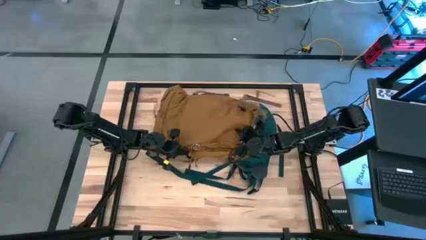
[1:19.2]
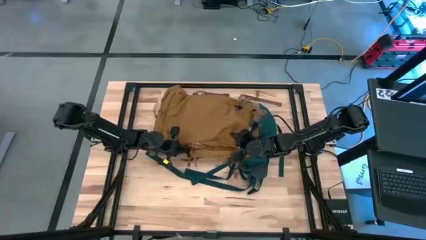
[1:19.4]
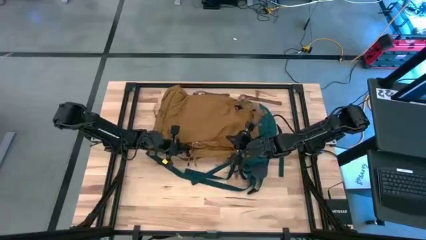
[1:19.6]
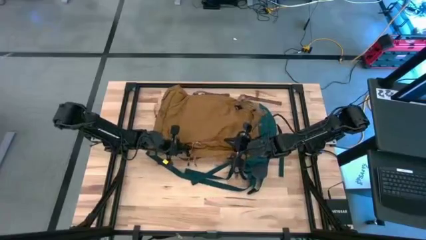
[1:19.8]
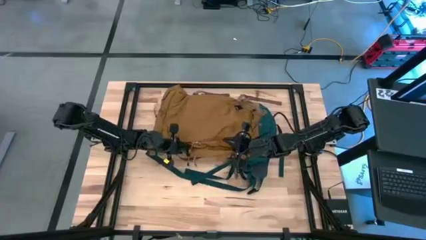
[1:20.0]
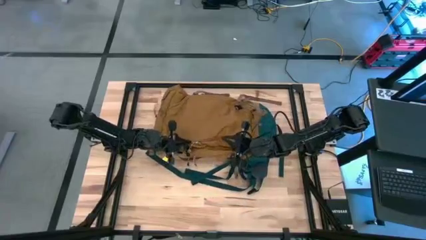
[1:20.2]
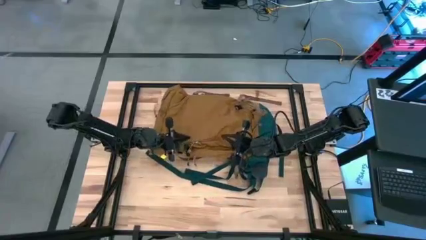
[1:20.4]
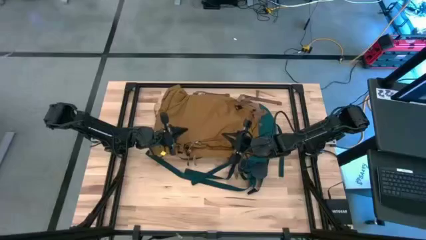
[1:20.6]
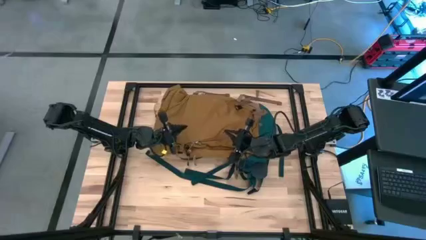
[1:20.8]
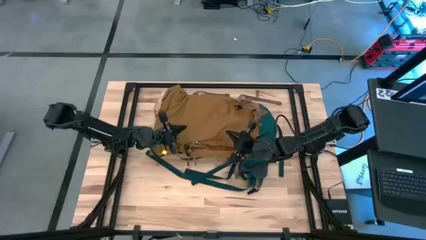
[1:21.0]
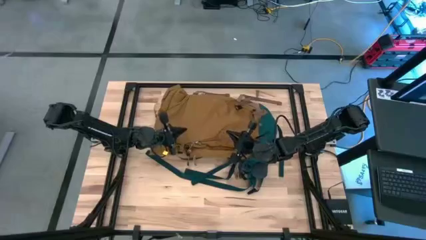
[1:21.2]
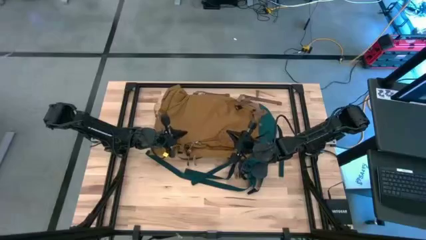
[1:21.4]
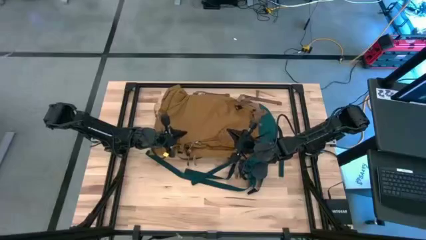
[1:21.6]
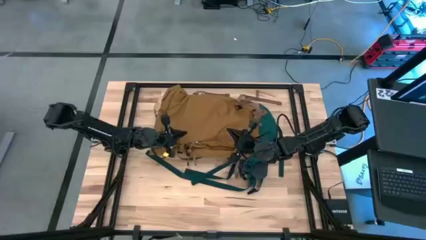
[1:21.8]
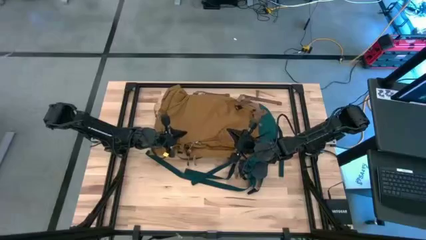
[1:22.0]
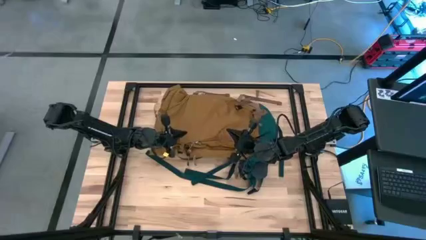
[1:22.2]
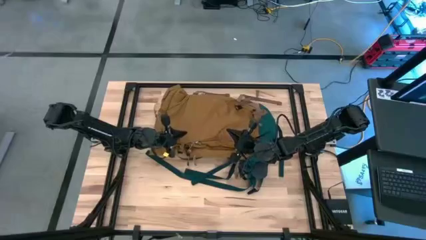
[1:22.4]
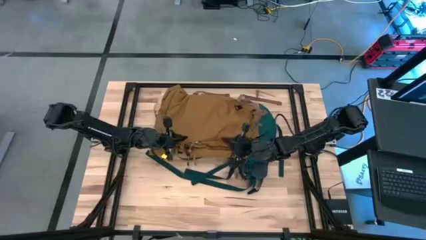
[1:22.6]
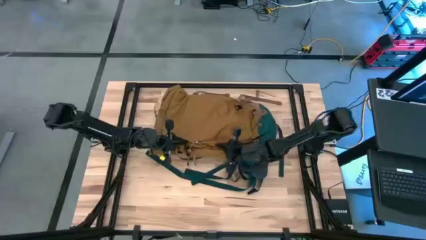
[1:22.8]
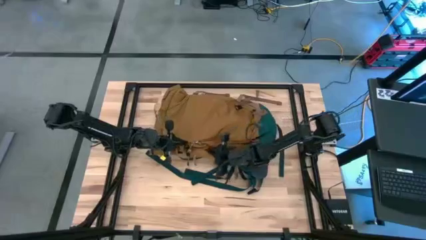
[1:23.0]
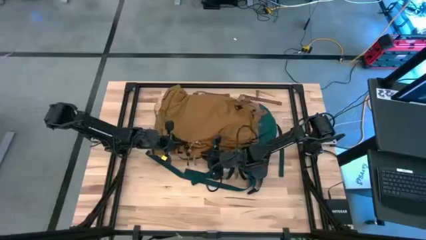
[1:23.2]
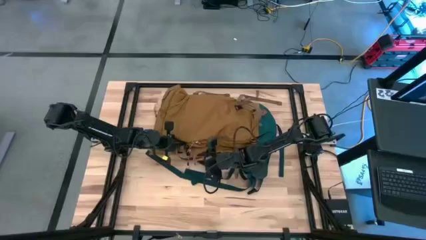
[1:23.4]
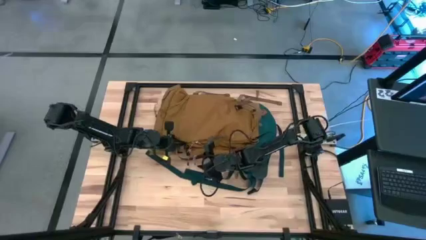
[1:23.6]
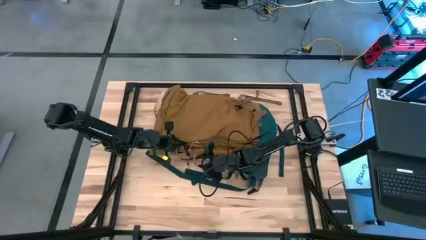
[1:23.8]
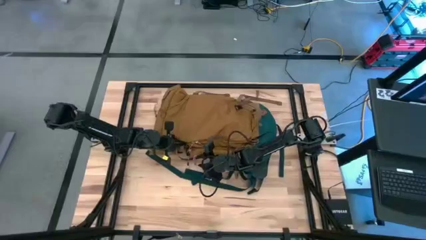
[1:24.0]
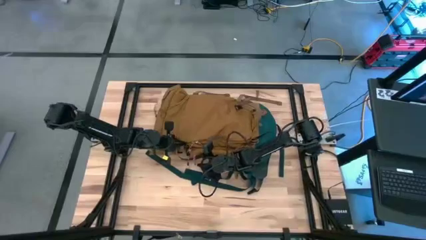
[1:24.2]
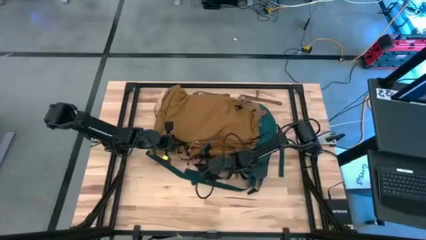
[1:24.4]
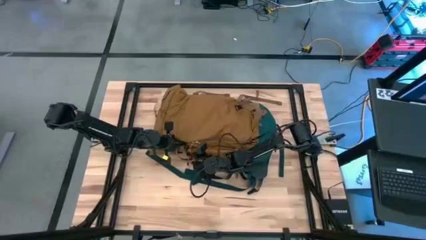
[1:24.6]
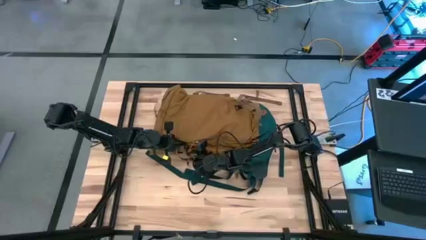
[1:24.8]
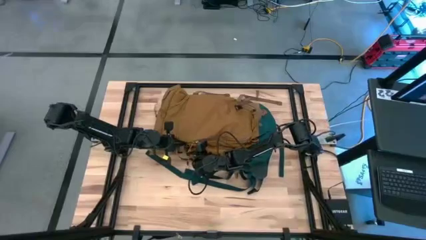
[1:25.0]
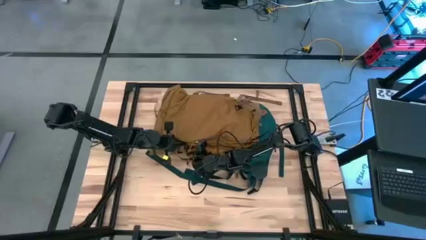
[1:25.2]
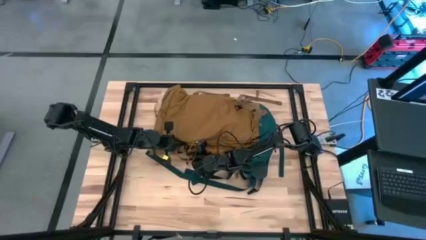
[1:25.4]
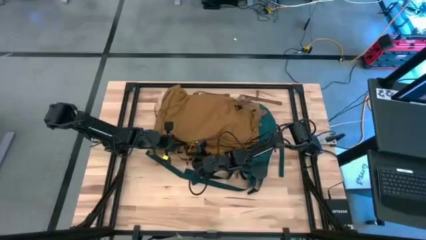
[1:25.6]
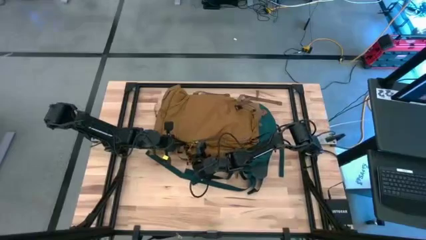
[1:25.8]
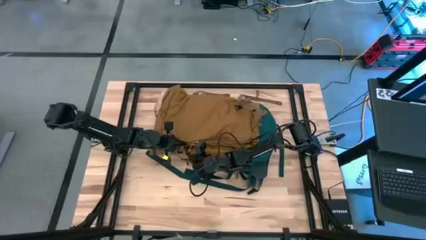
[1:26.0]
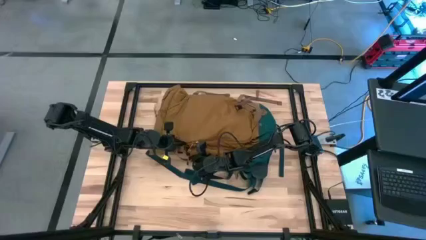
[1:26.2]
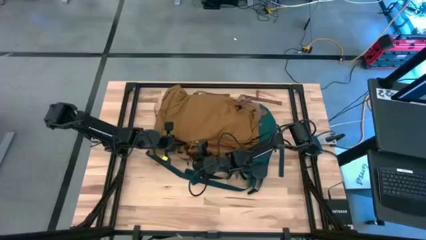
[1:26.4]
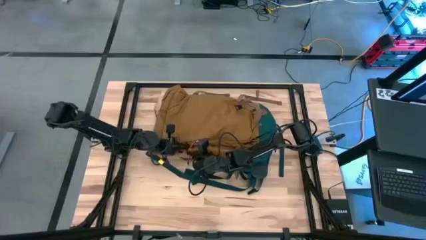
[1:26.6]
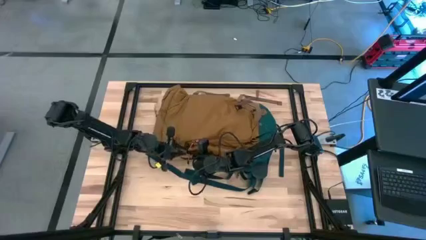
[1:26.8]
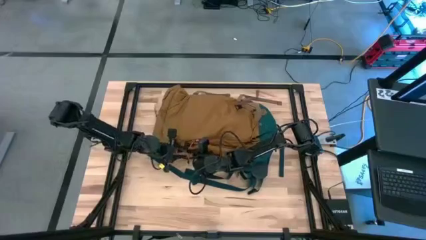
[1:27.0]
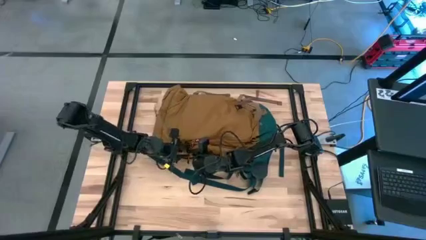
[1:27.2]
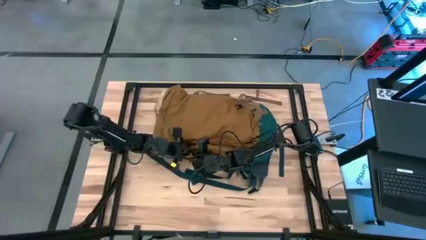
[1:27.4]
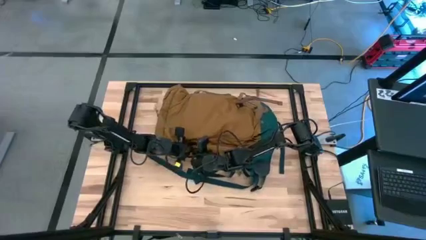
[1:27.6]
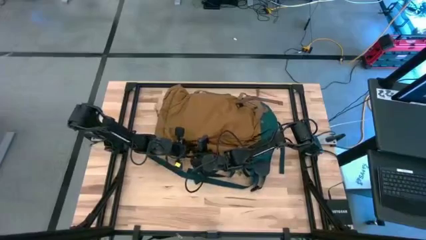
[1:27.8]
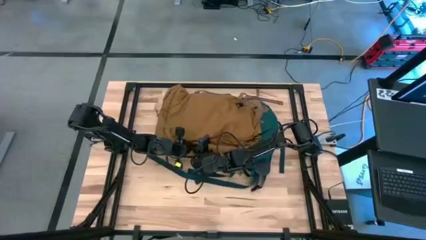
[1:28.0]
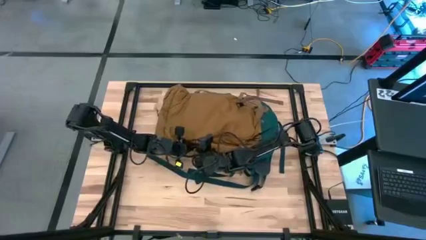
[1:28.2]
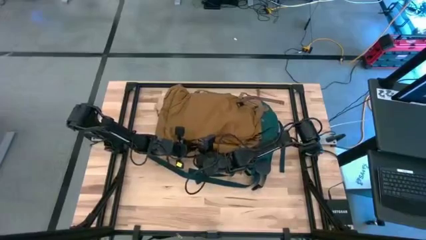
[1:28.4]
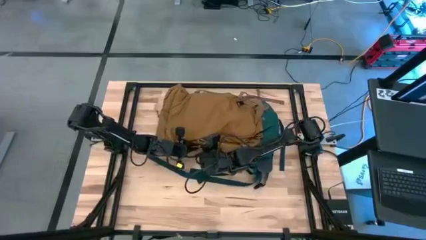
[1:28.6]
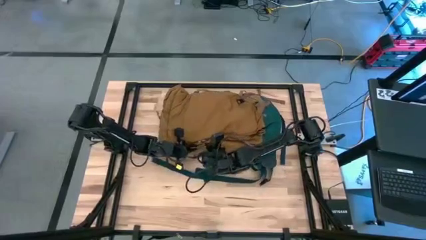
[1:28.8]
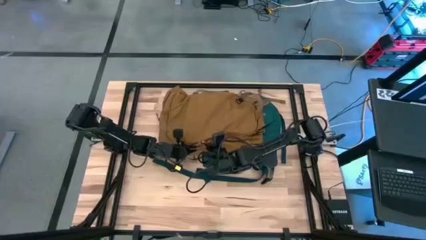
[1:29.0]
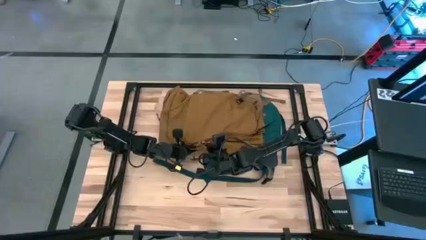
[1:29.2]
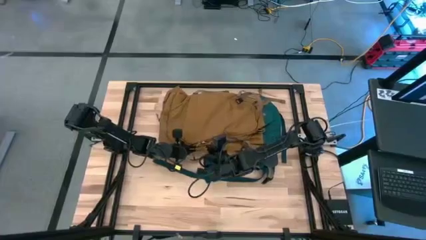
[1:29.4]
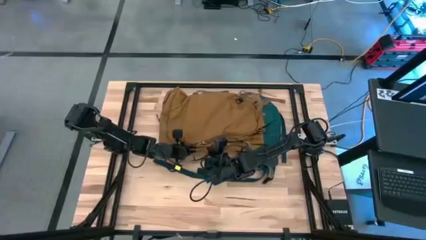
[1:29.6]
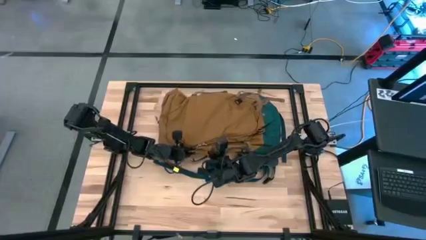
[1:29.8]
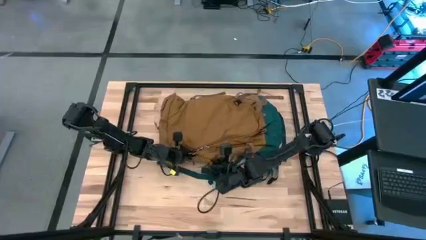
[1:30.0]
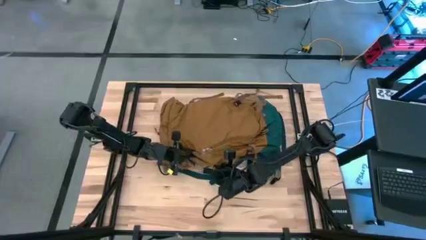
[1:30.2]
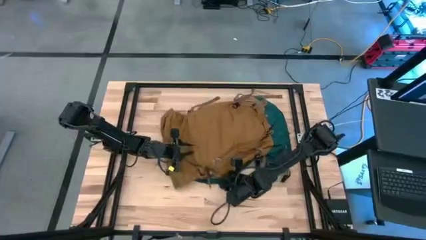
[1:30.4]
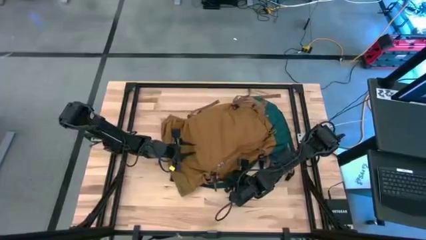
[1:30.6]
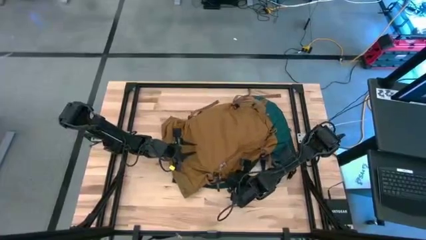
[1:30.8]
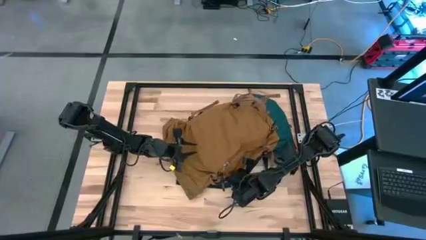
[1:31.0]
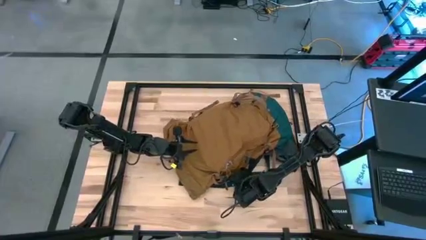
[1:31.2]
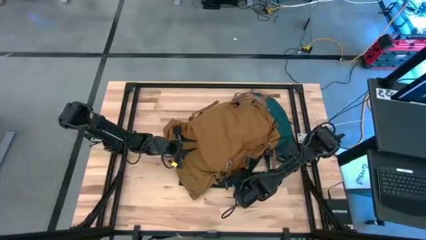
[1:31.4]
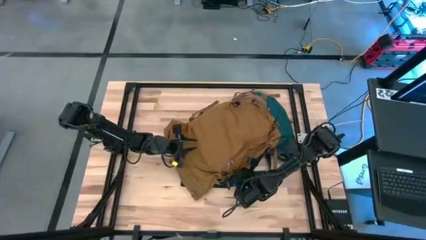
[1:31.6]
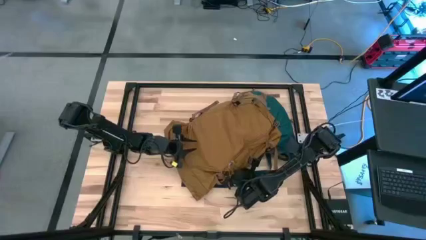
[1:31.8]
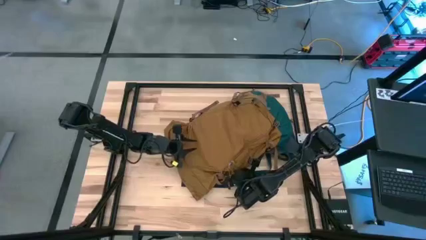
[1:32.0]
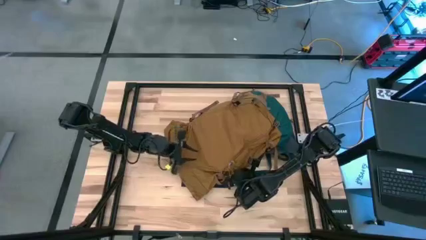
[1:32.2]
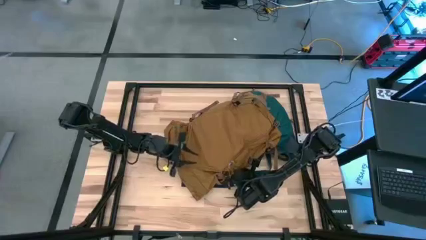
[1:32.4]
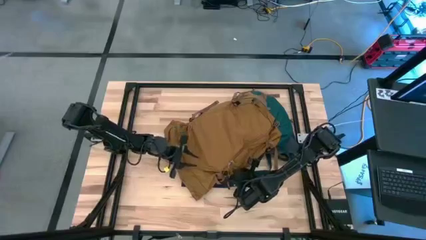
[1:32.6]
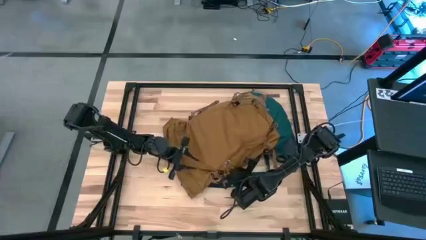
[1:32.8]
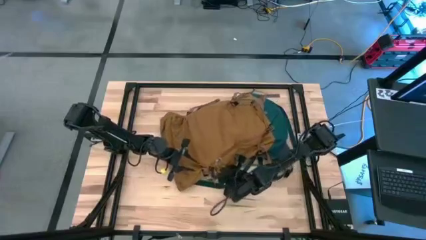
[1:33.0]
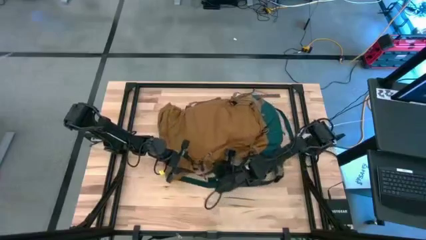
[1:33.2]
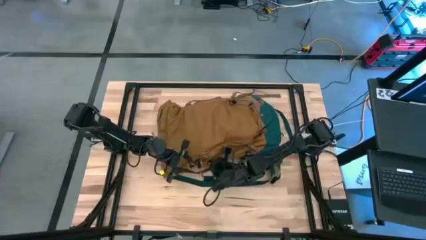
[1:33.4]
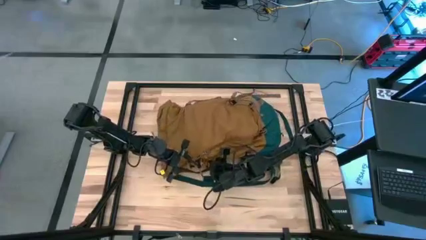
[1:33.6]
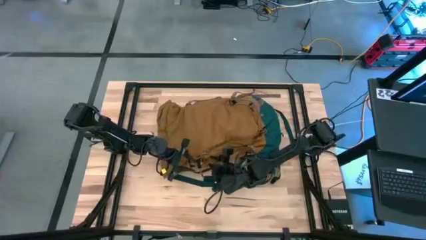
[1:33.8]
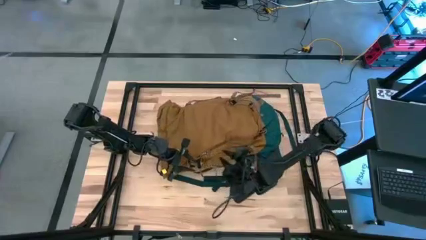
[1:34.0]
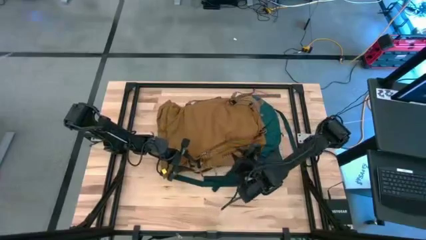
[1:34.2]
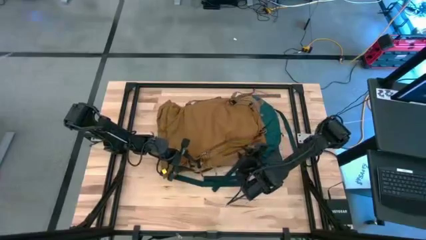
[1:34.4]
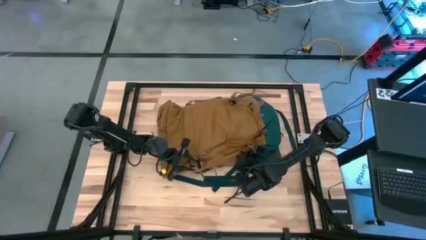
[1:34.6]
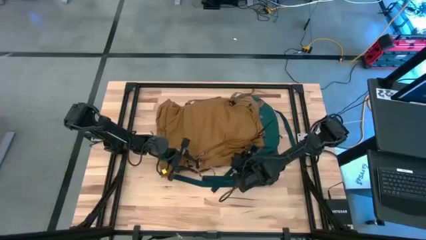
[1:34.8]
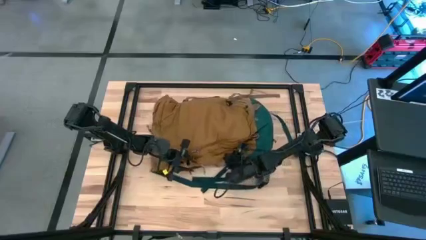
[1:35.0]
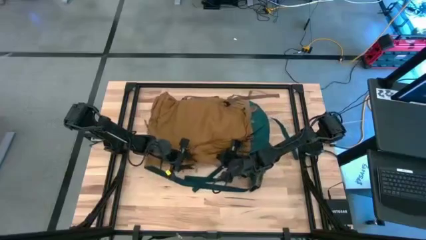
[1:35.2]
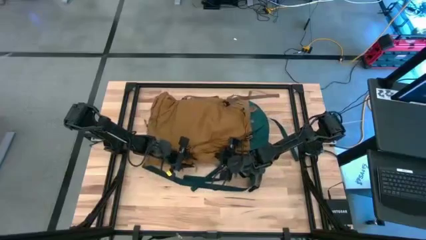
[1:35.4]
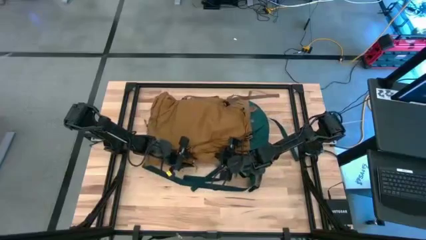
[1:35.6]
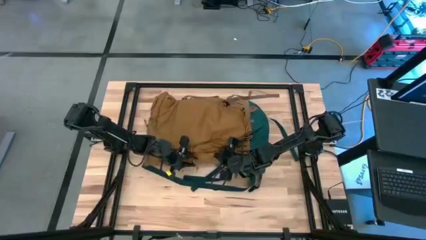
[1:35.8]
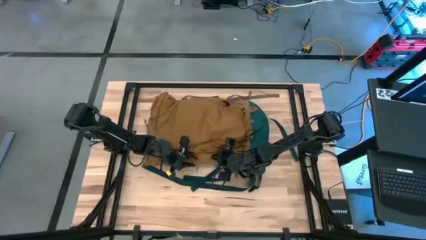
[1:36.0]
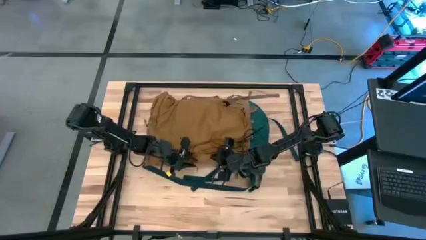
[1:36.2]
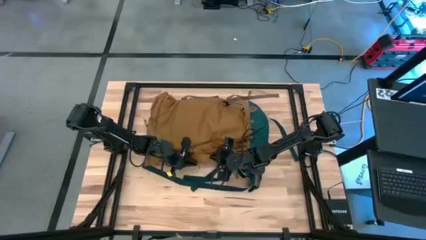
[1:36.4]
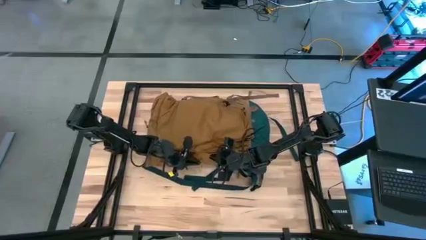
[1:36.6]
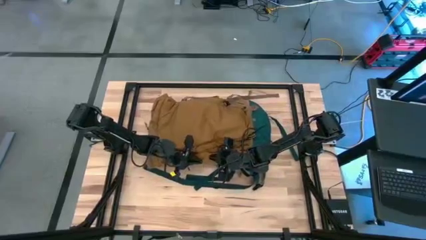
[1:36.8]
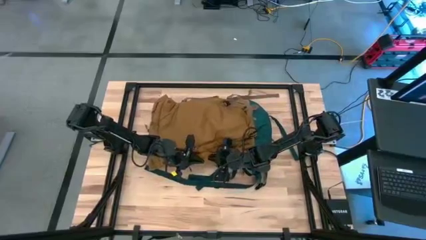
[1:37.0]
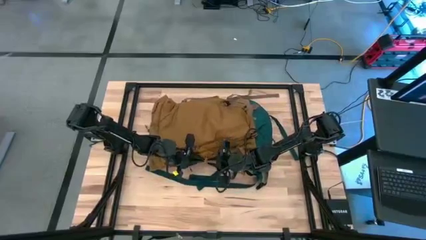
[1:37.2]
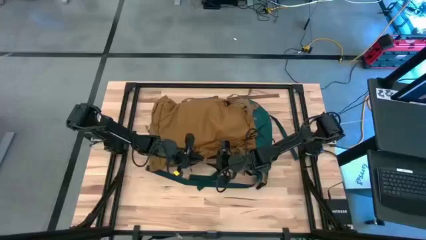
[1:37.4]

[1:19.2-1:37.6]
Task: Unpack backpack
Open the brown backpack
